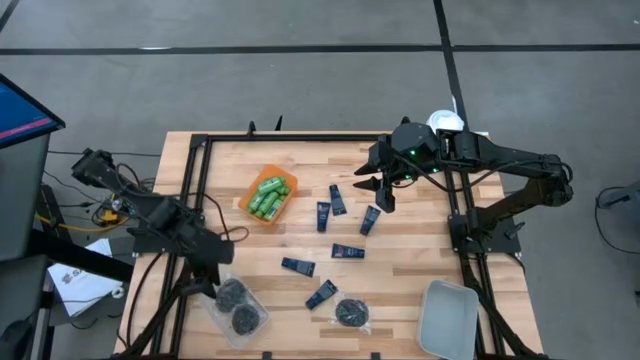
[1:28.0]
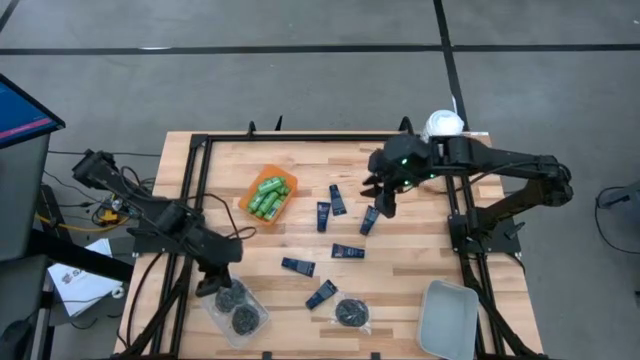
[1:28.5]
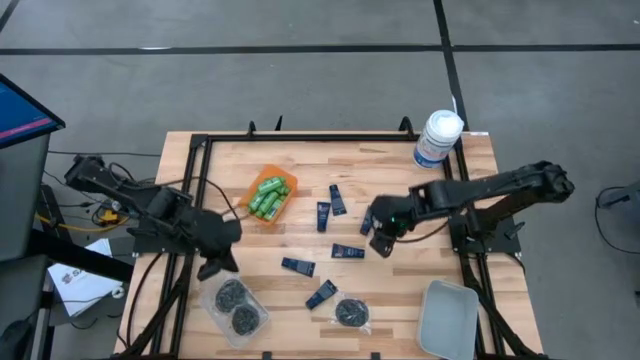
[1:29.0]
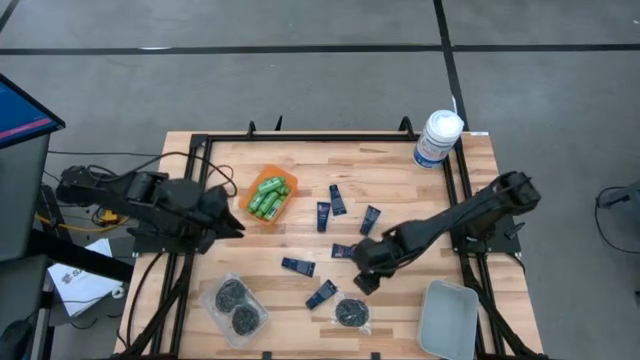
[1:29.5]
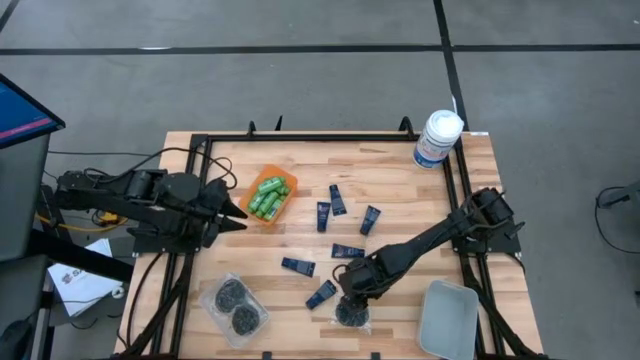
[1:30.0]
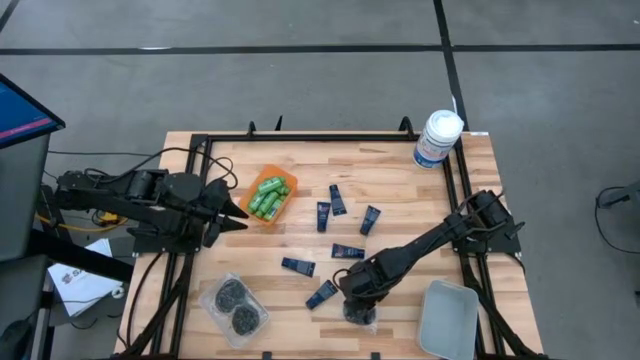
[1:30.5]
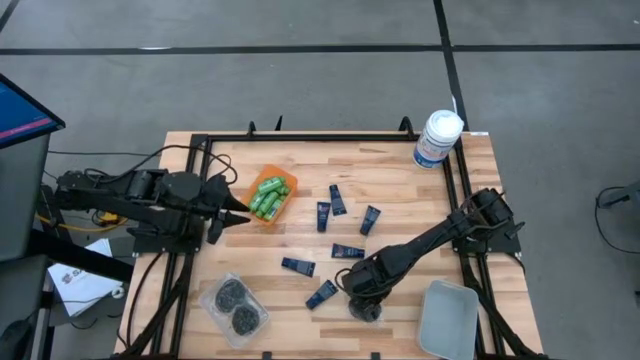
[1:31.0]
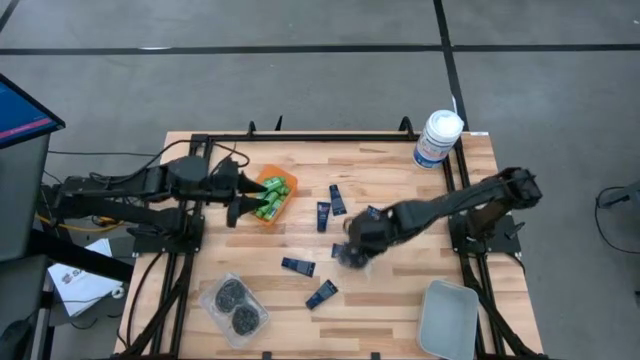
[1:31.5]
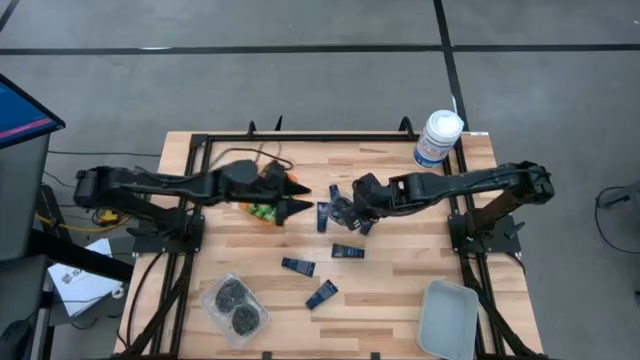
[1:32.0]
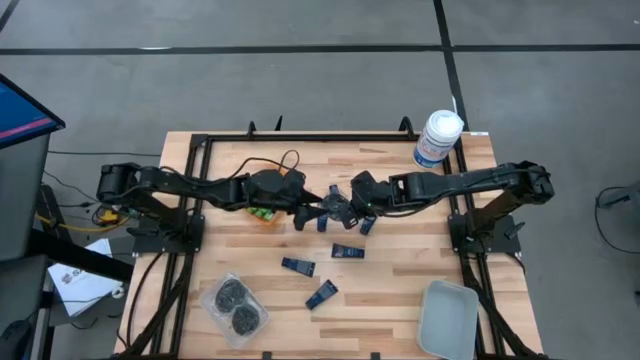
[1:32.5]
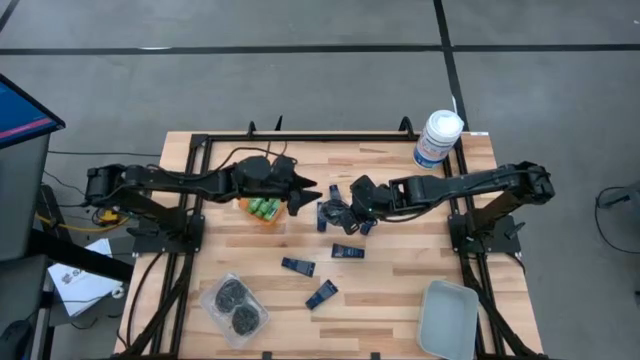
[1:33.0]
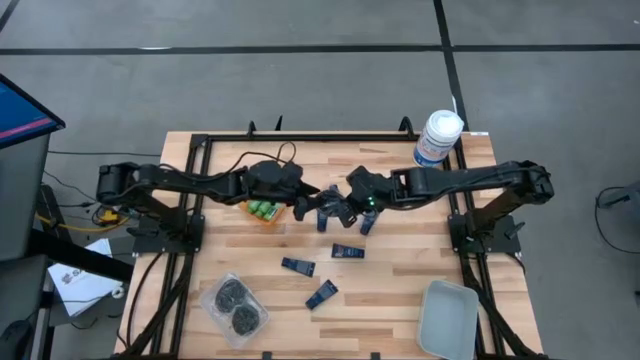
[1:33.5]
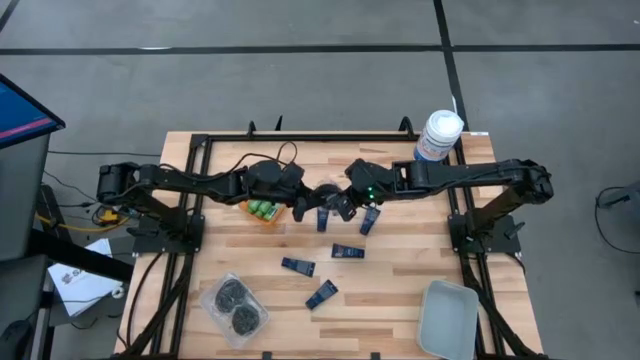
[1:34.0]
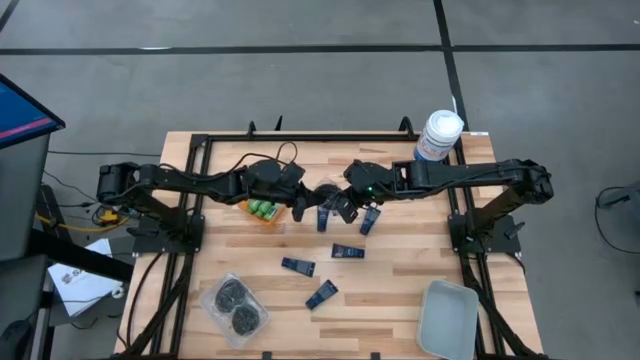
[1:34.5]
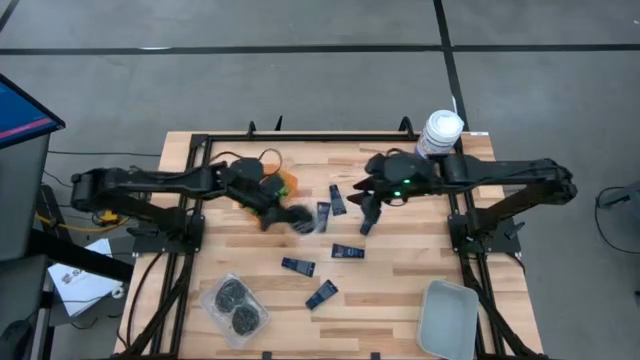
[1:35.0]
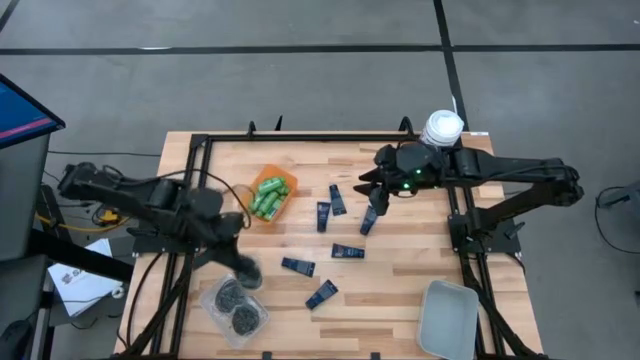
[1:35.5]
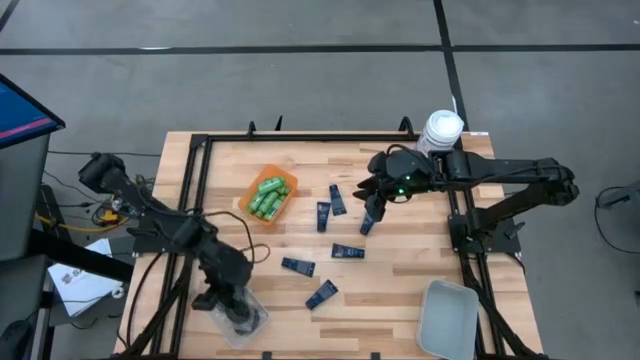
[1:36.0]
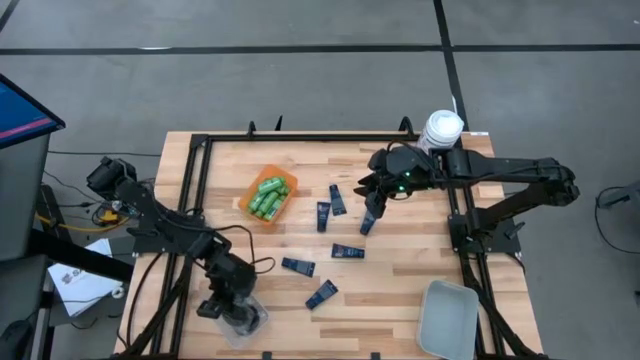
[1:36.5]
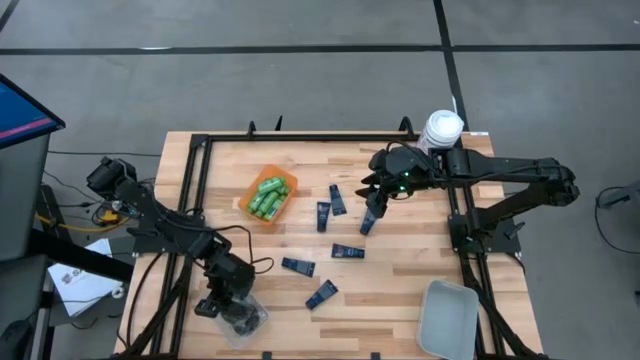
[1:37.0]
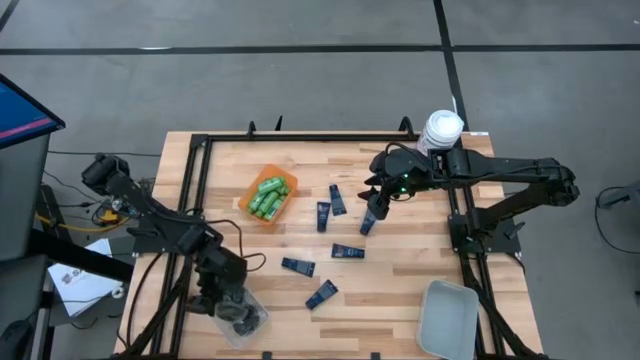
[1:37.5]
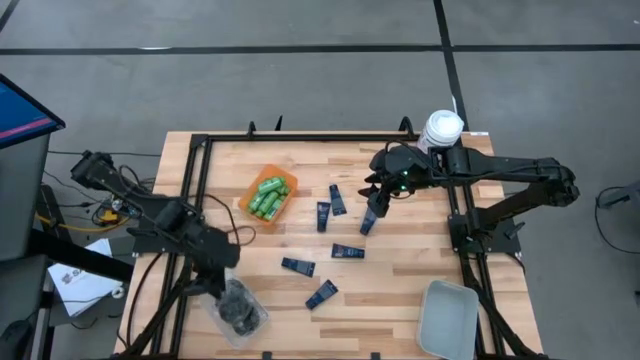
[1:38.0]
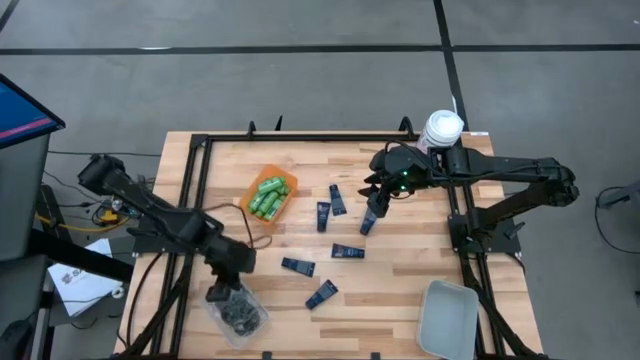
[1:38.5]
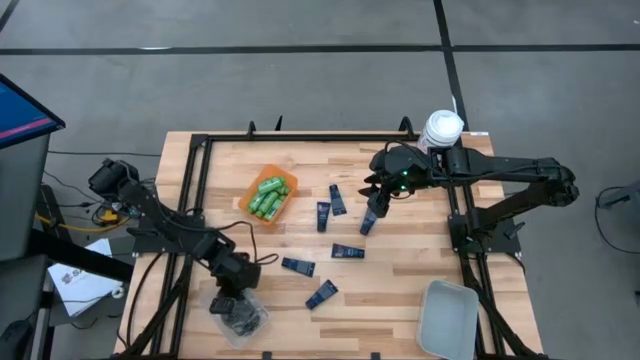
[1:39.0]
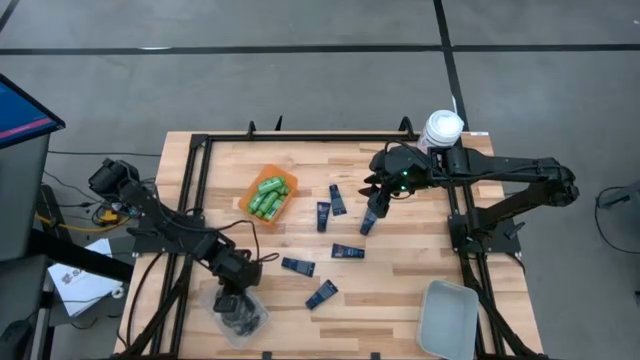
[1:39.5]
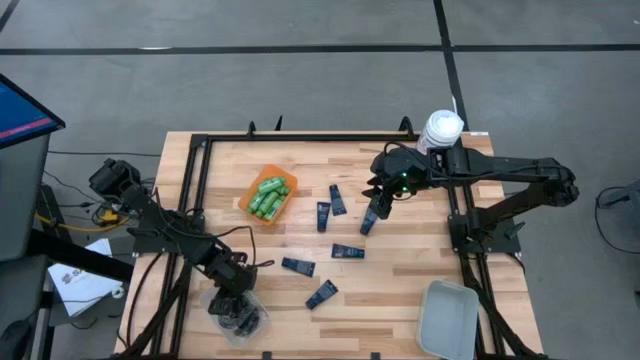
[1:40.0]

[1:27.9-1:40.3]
Task: Pick & Place Travel size toiletries
Put the black hairbrush into the transparent bin

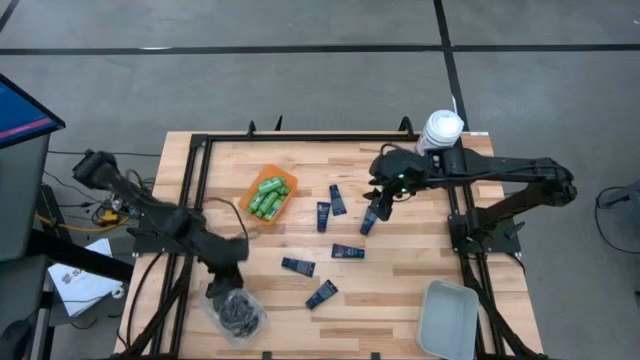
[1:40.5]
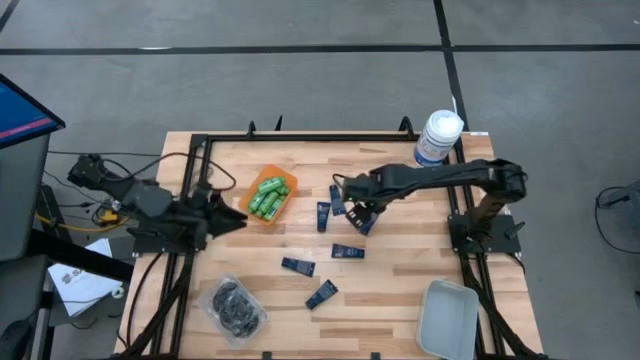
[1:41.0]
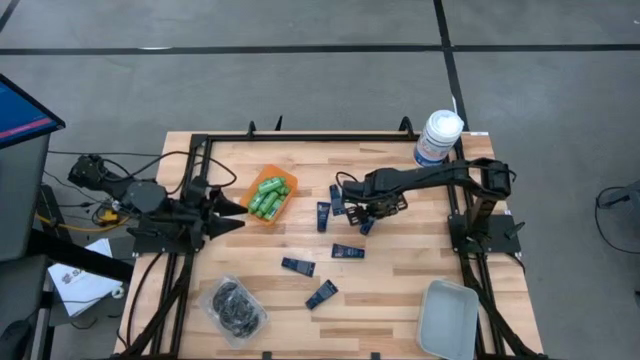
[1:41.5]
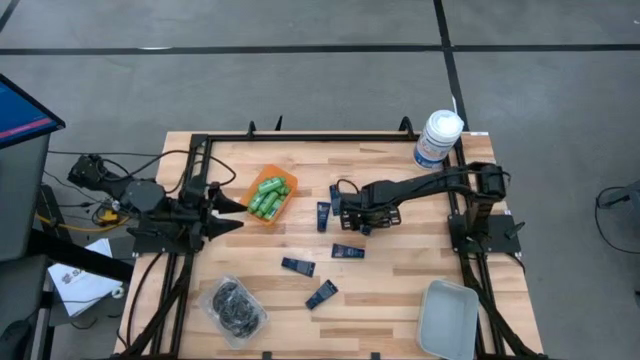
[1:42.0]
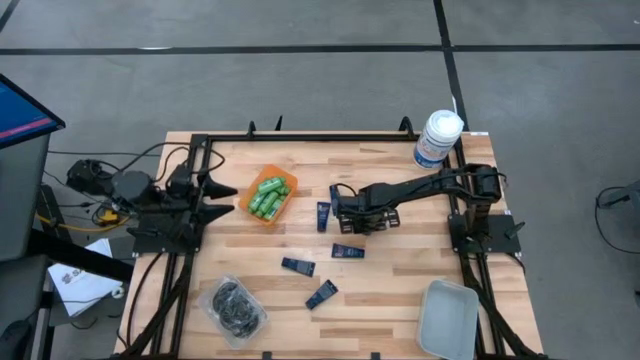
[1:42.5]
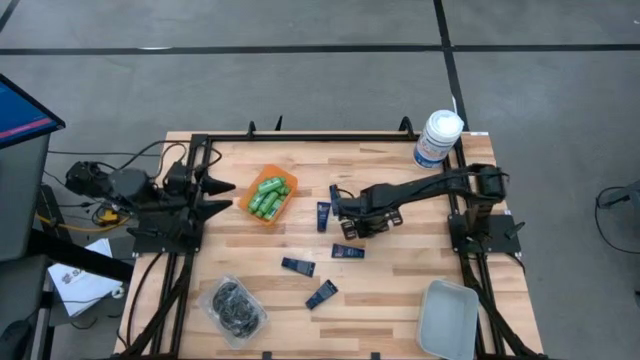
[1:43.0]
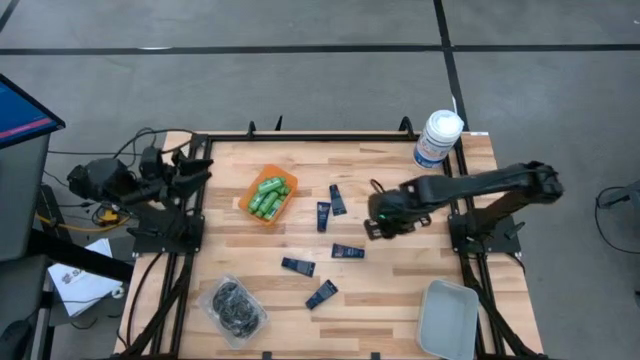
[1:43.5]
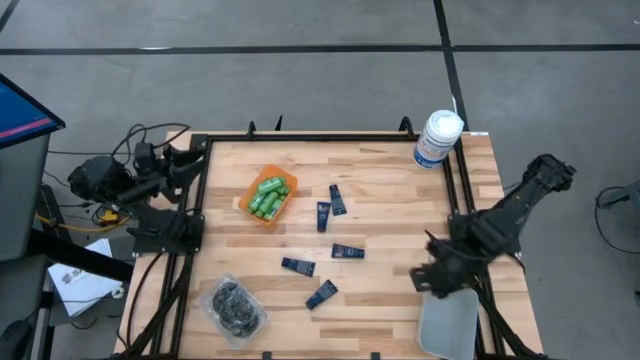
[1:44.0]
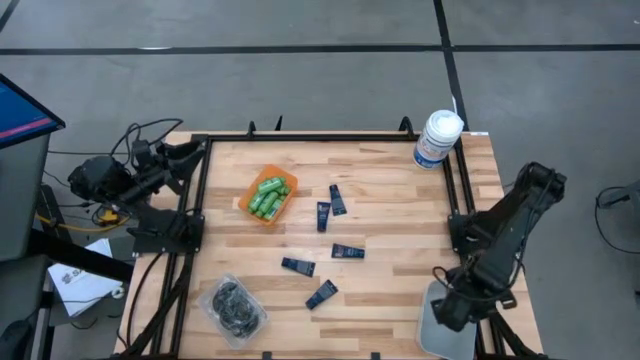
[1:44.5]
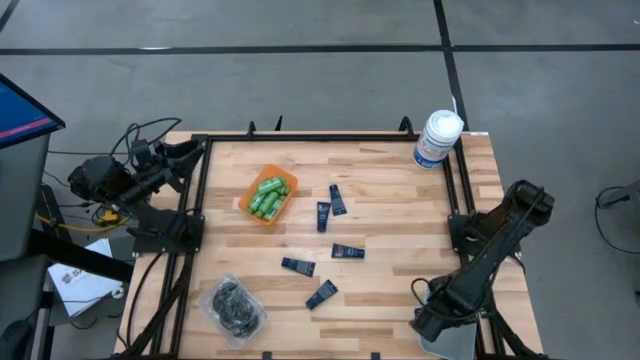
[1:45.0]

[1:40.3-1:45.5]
Put the dark blue shave cream into the gray bin

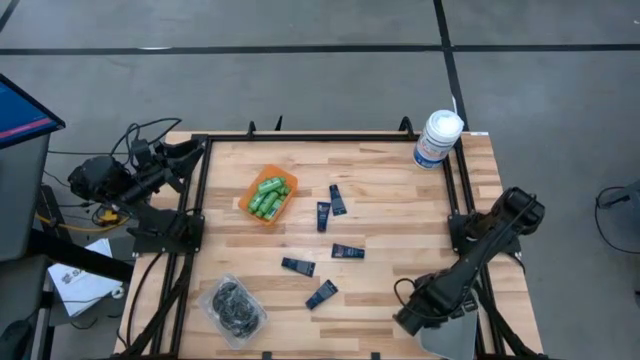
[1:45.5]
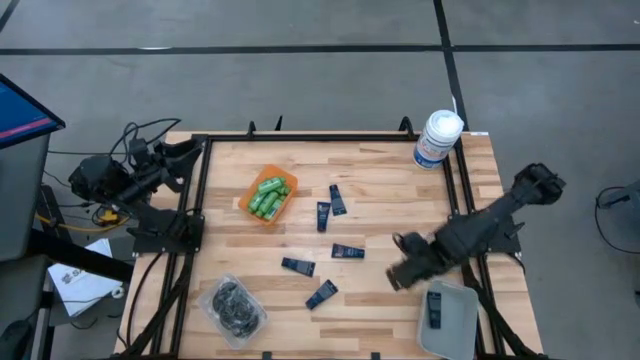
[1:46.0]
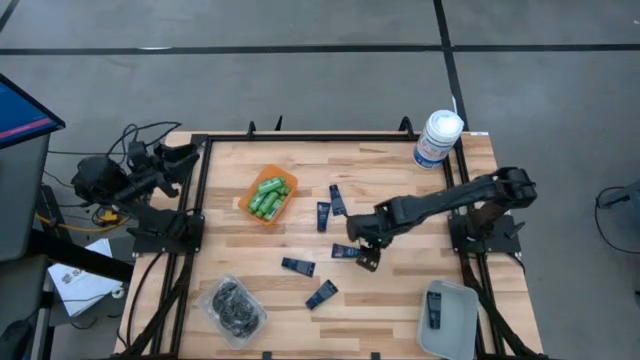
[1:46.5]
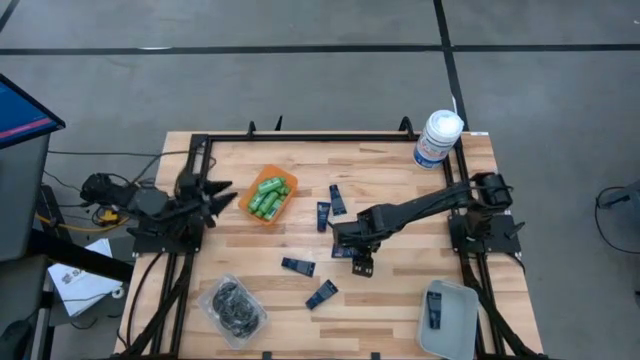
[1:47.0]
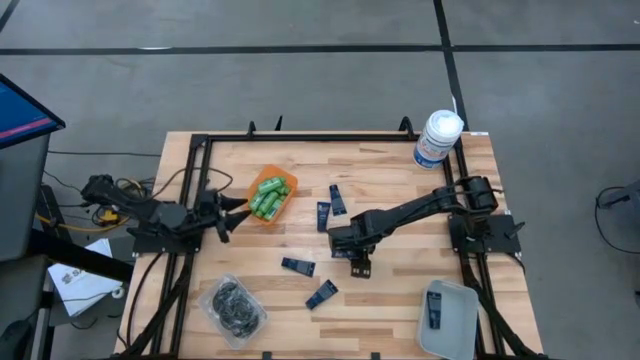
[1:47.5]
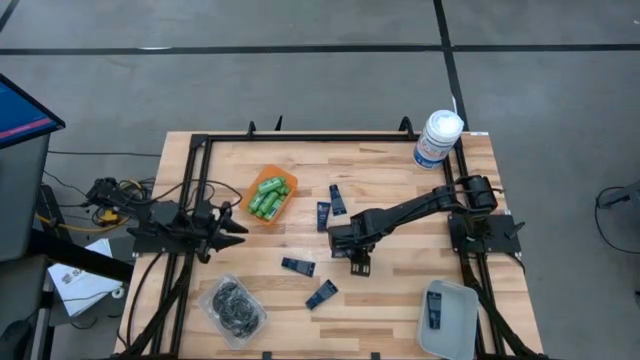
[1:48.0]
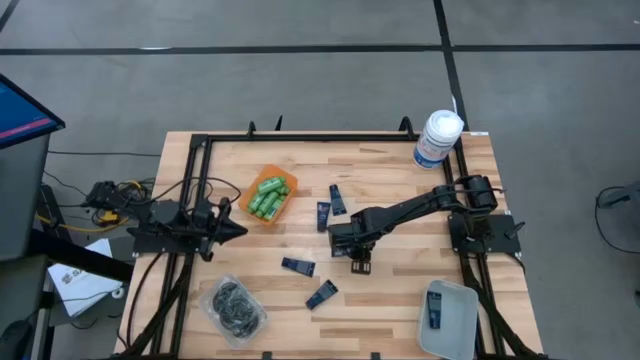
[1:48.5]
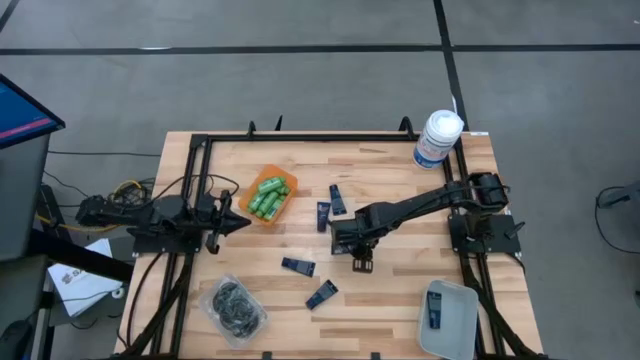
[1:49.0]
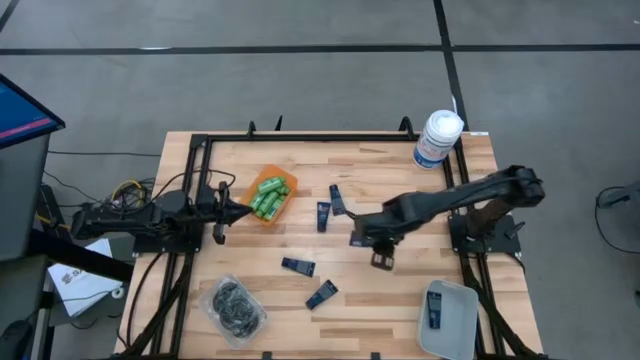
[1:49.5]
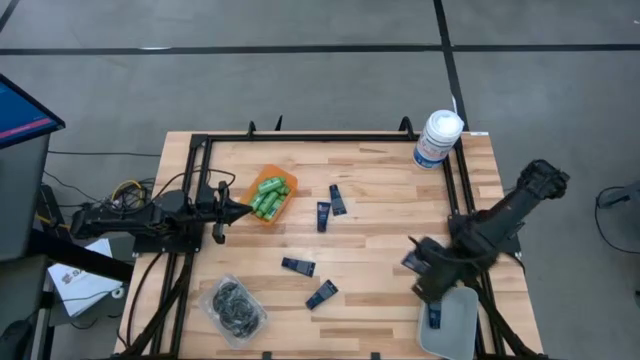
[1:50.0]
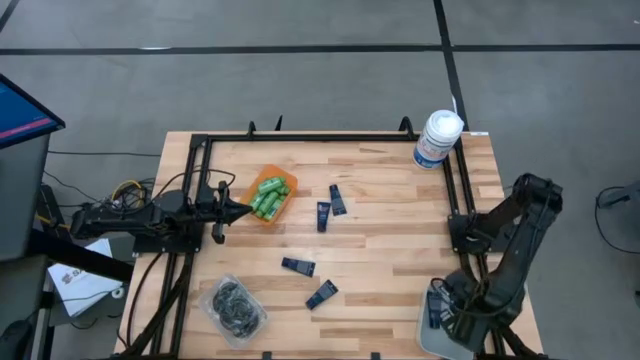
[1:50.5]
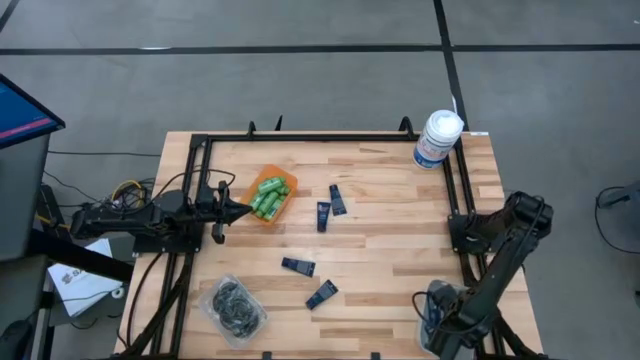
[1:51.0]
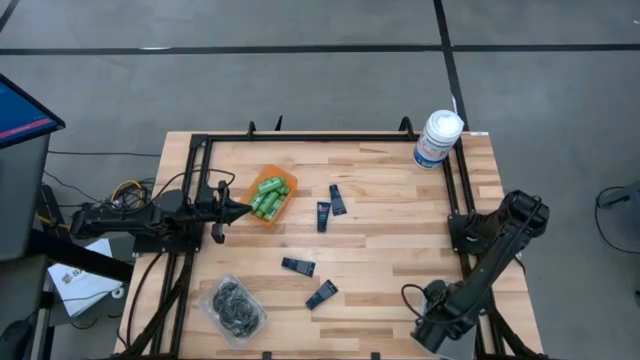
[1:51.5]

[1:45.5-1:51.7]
Put the dark blue shaving cream into the gray bin
